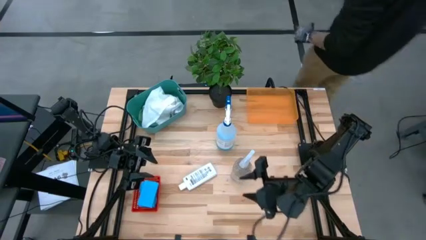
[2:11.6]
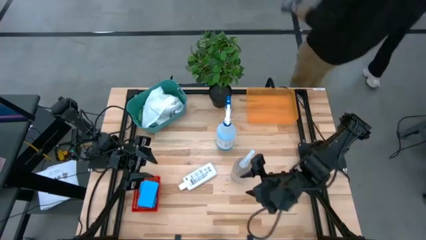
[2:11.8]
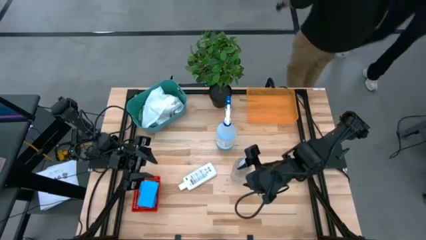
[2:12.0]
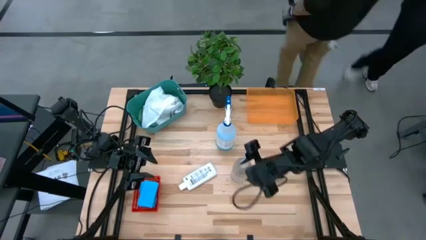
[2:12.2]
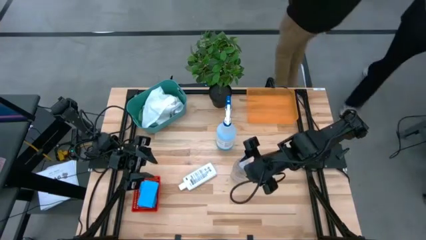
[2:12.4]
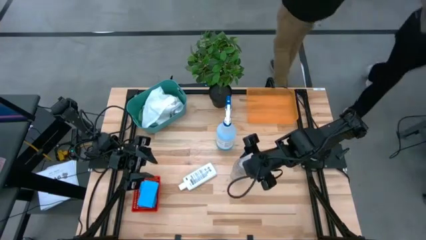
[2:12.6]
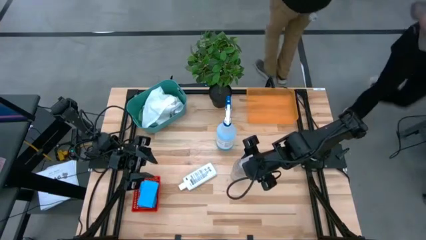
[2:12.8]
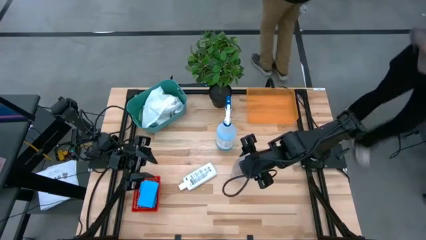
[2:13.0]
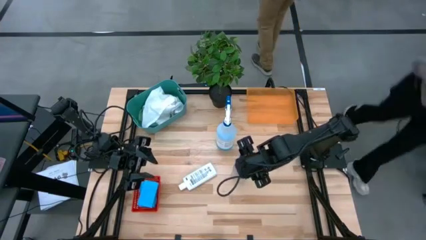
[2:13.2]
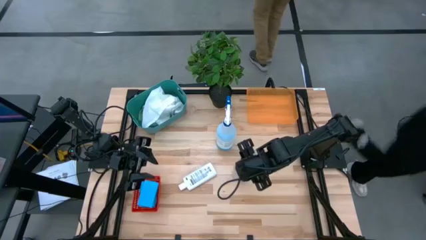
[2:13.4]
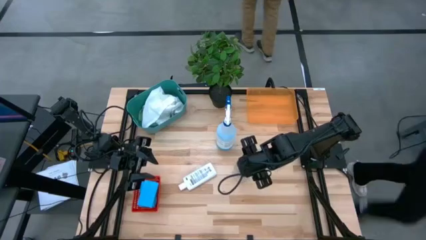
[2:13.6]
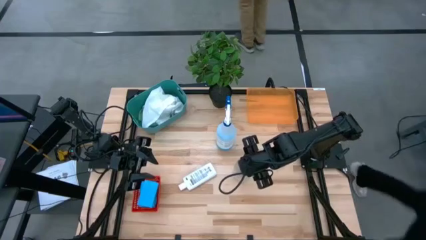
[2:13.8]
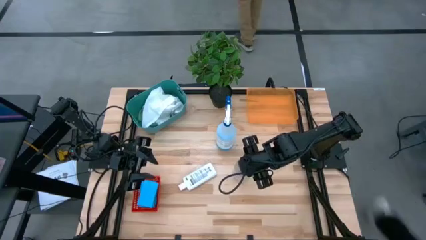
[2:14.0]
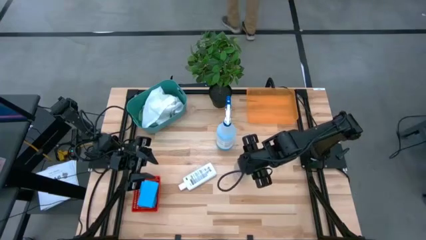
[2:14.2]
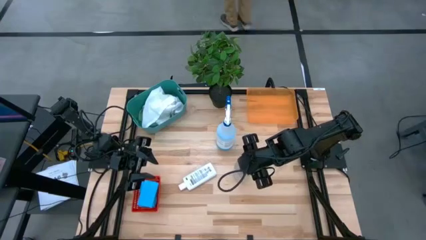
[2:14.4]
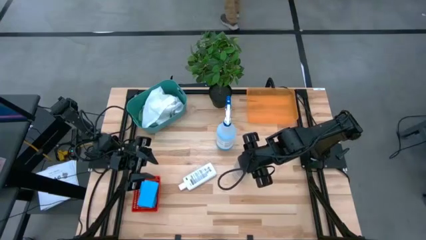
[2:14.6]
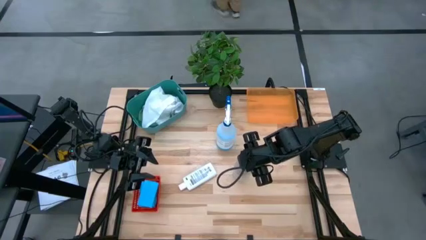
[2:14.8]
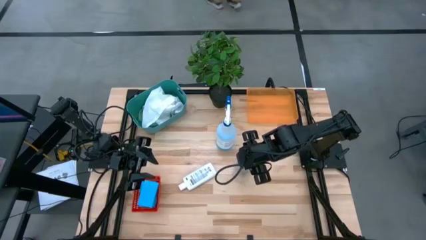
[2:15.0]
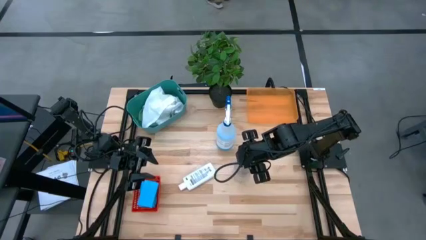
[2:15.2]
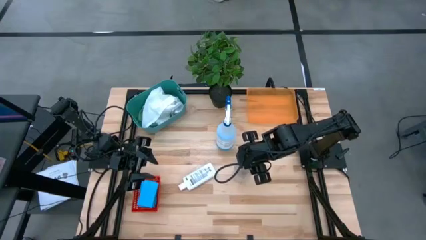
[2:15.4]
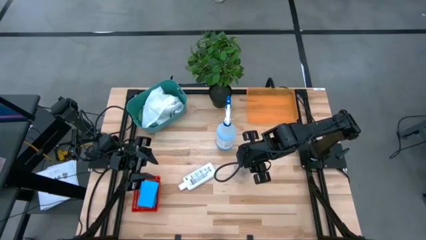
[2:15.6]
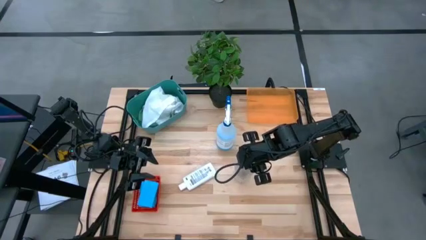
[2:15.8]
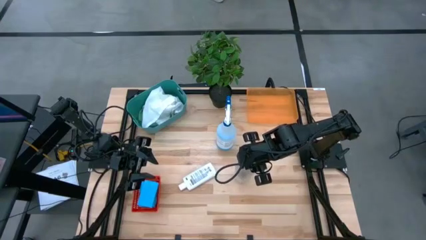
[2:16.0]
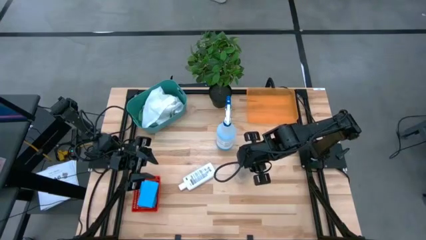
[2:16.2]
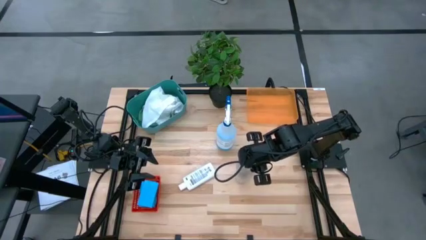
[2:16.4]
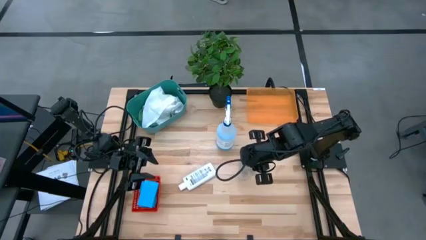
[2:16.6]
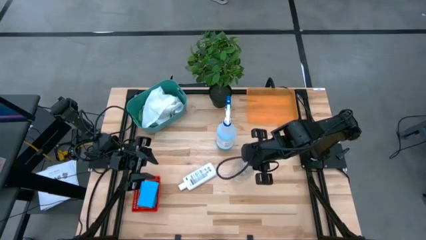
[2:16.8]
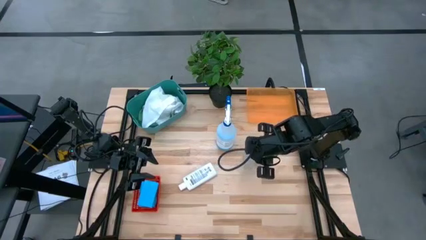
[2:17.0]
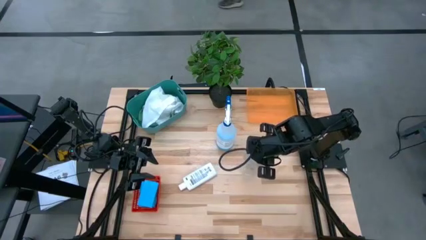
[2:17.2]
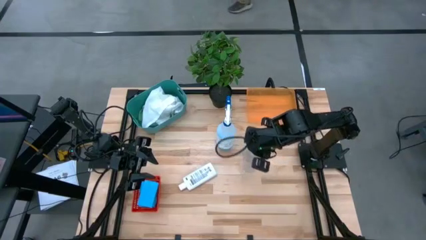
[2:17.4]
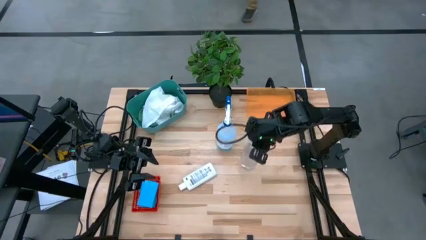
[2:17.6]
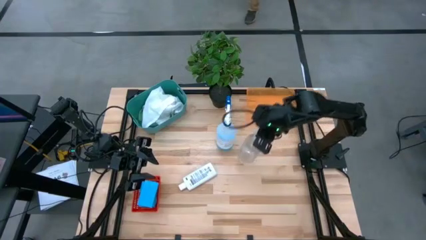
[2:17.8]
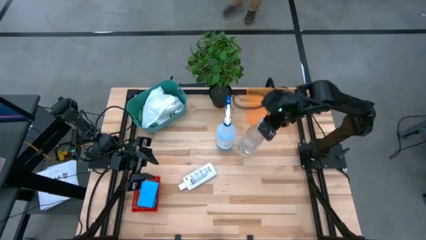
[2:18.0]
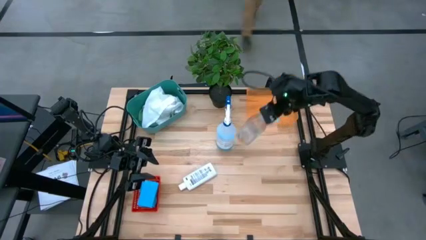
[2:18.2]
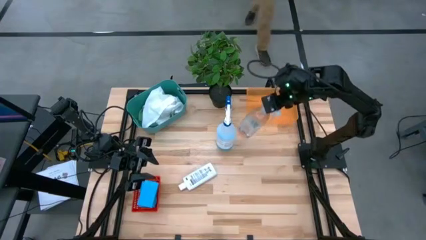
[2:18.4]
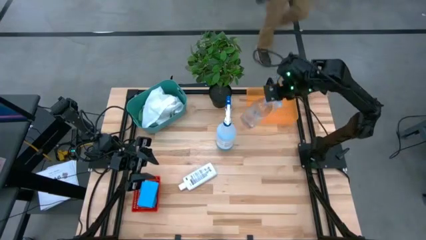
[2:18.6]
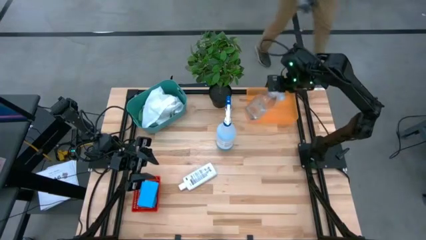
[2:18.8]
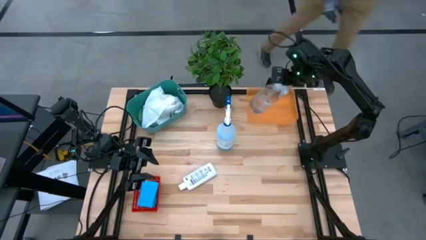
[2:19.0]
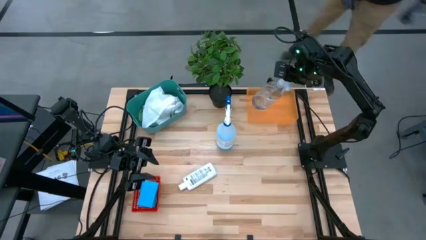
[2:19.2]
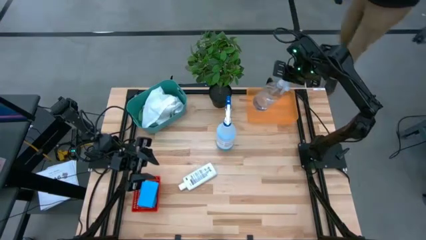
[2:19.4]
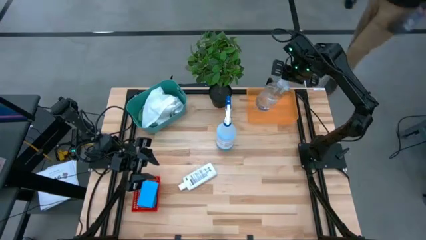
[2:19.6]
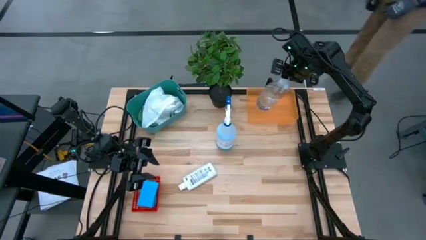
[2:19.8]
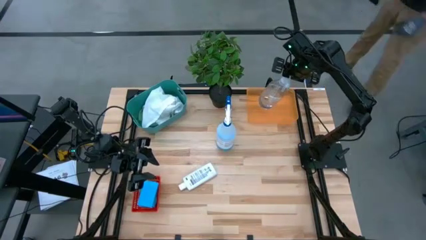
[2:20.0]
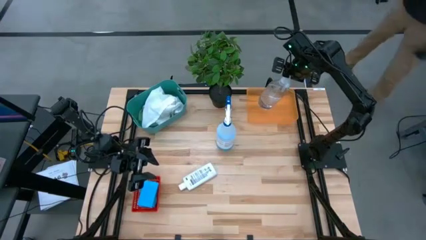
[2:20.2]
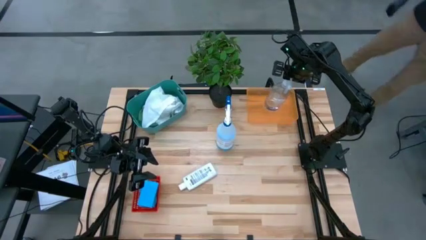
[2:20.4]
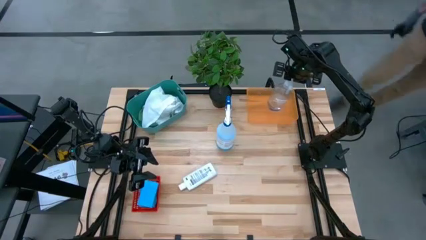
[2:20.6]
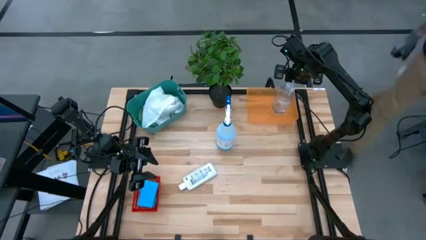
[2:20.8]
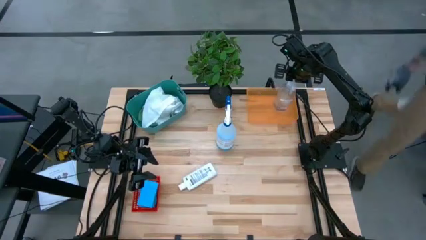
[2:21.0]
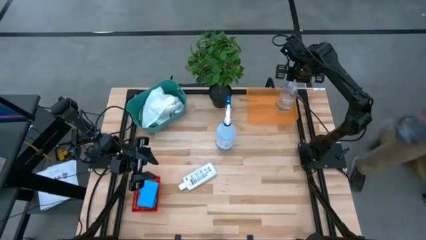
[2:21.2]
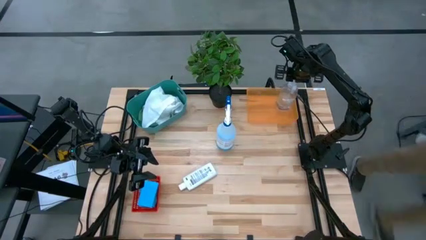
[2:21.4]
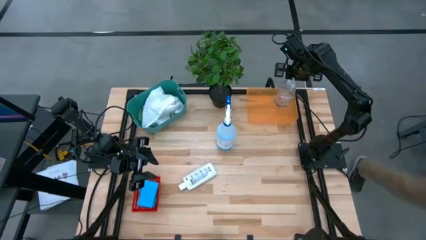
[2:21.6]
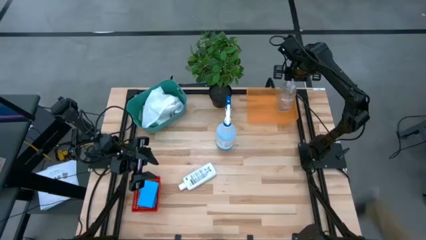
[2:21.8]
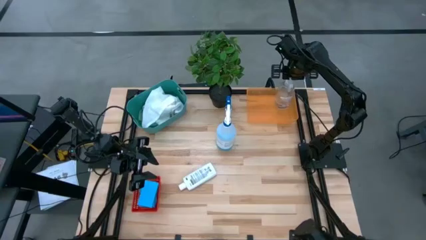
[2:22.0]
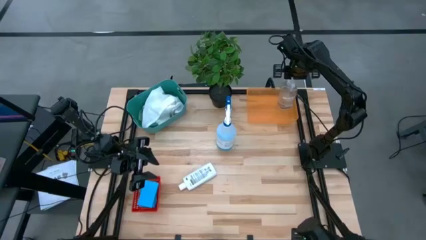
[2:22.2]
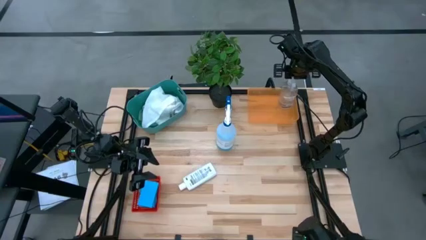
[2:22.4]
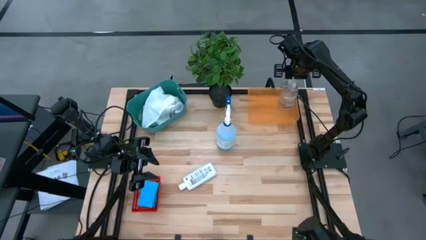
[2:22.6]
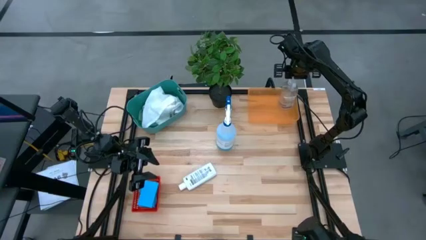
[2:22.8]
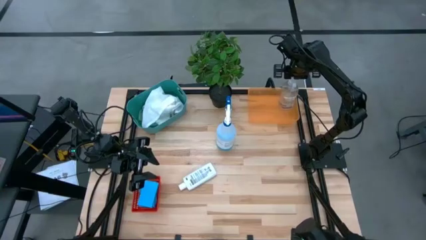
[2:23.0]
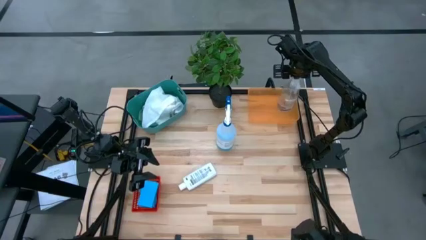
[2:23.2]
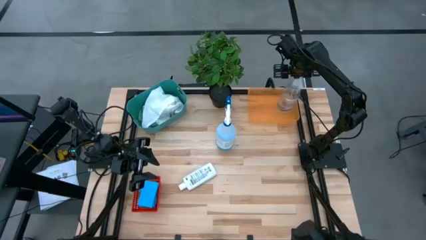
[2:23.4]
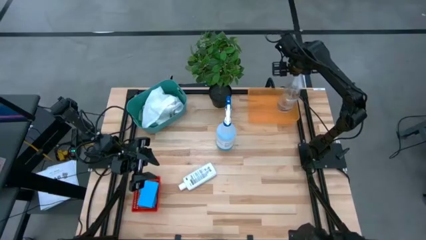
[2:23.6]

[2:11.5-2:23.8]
Task: Pick & Place Kitchen Items
Put the transparent bottle into the orange bin

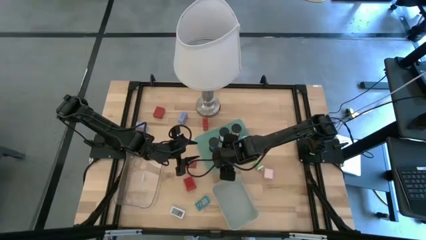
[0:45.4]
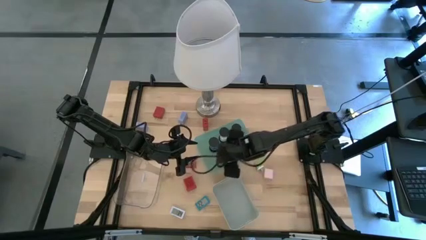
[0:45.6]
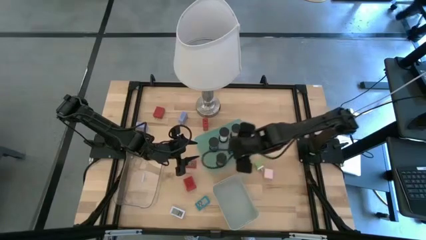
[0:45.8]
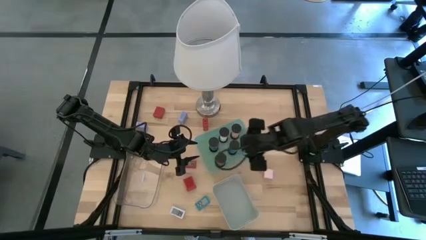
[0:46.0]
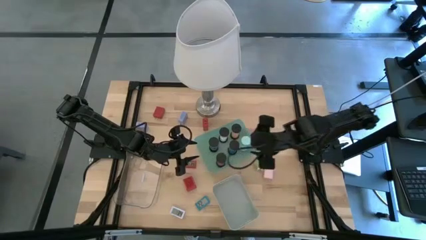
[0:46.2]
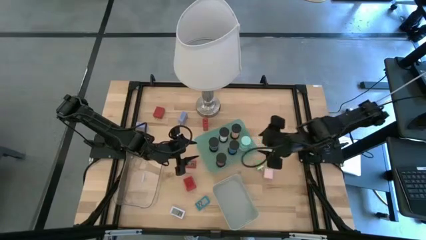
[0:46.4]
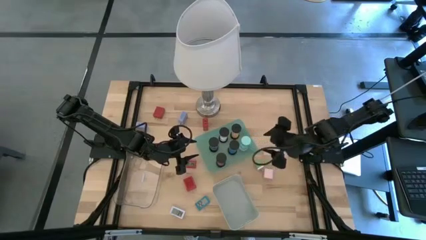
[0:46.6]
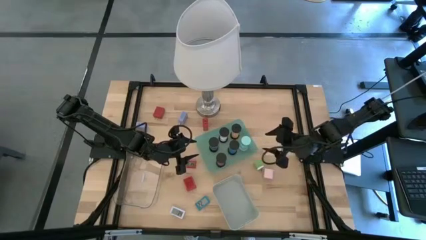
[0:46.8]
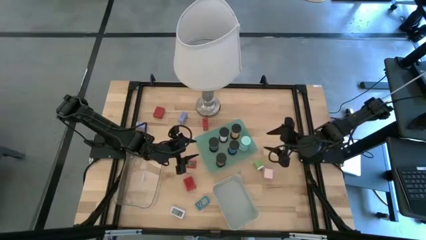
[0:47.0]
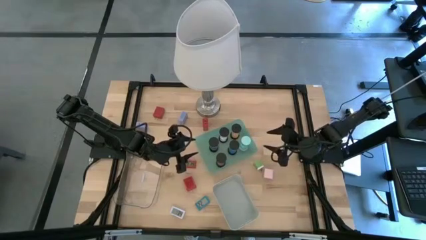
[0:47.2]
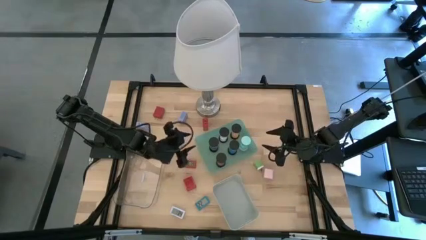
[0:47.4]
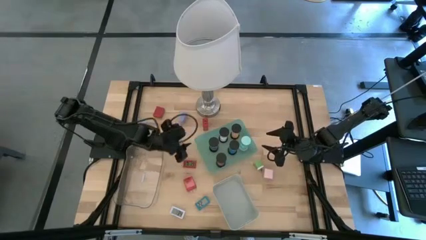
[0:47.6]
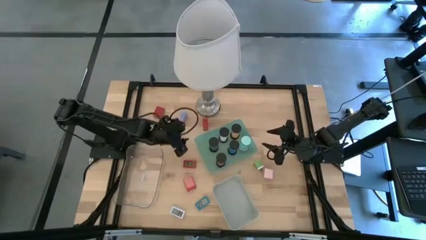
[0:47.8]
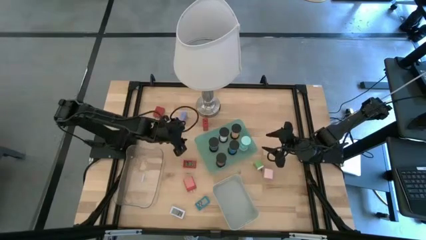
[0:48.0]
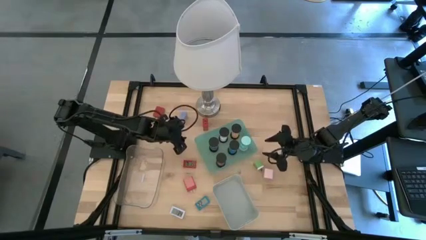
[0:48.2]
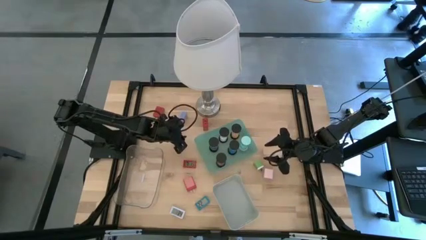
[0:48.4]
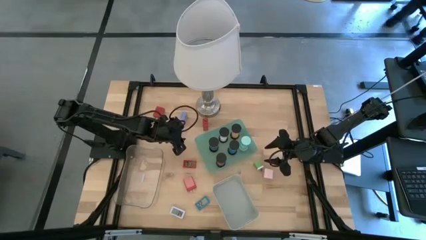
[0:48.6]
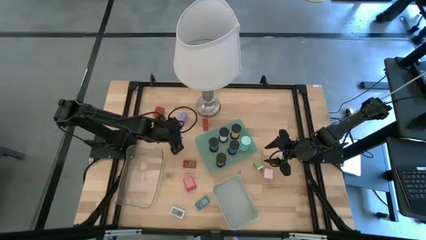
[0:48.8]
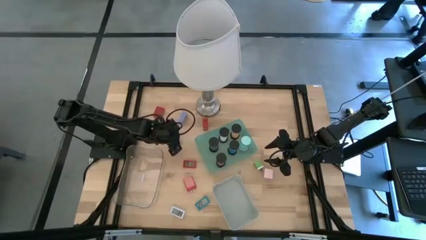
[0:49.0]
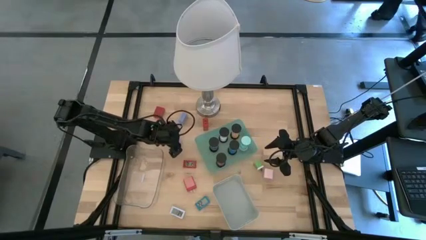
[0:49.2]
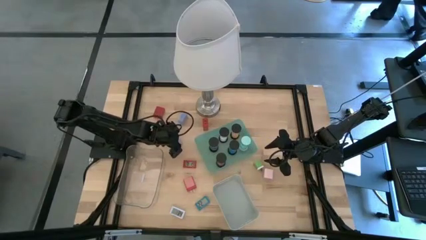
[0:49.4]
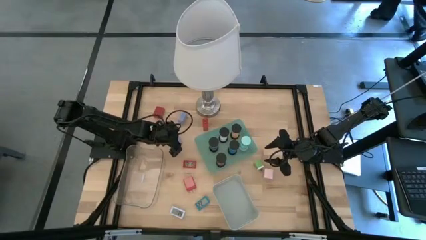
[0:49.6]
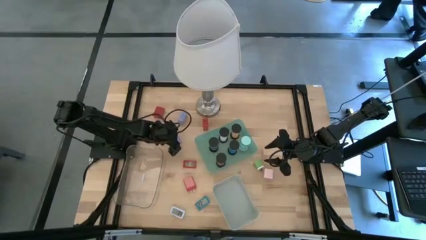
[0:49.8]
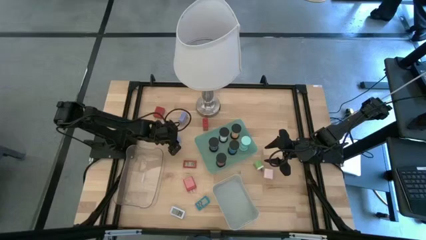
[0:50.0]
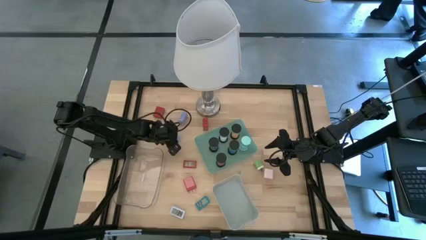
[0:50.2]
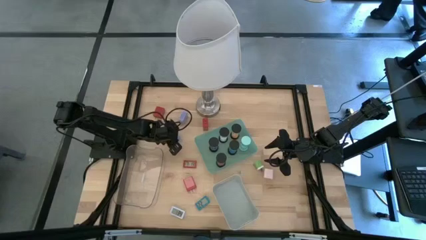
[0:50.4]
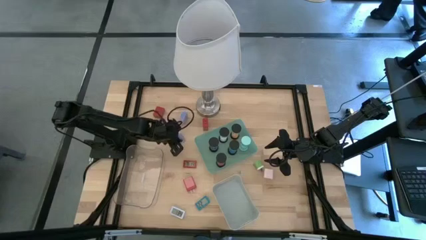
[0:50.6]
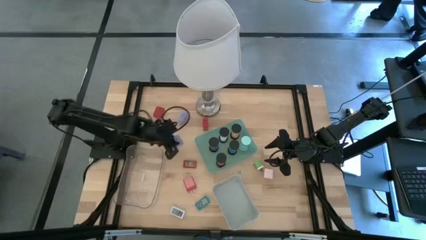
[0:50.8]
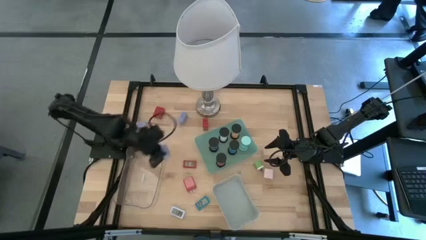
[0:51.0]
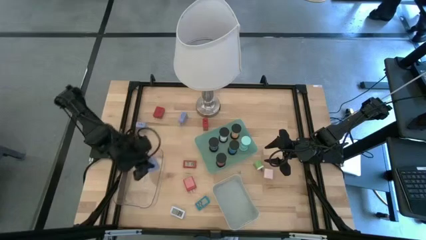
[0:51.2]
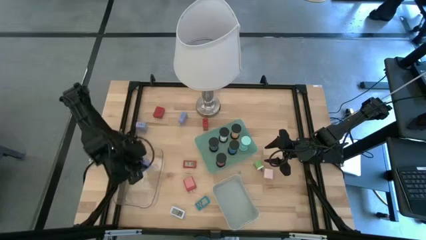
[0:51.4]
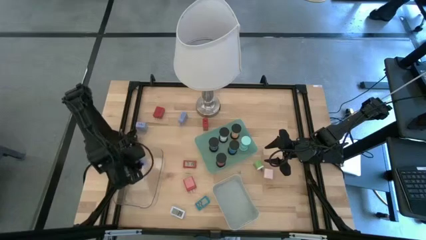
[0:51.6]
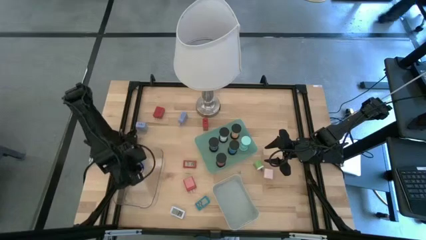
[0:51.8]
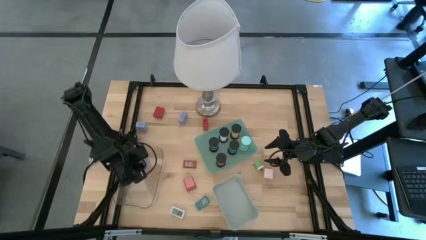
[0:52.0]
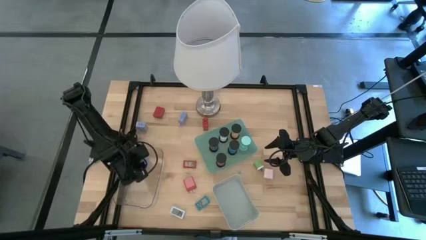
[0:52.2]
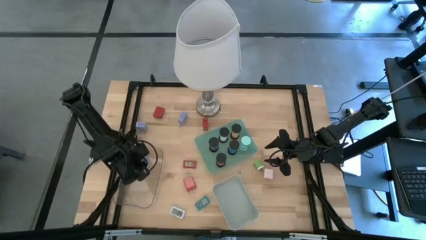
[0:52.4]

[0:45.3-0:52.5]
Task: Pick & Place Office items
Put the bottom blue charger adapter into the transparent bin
